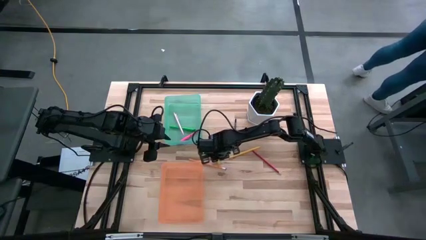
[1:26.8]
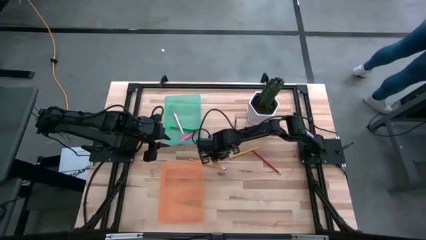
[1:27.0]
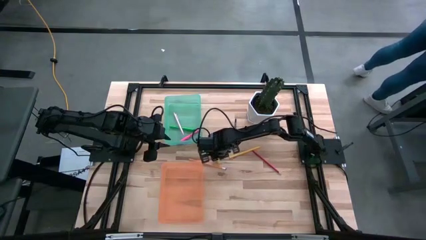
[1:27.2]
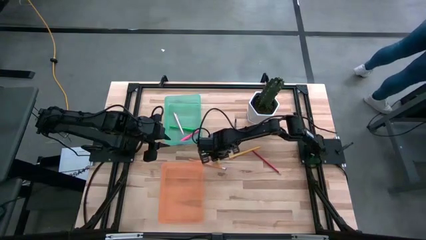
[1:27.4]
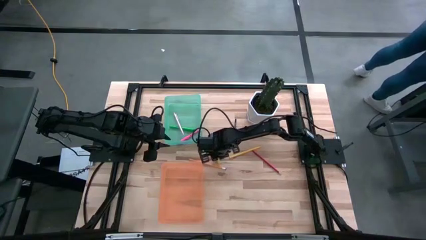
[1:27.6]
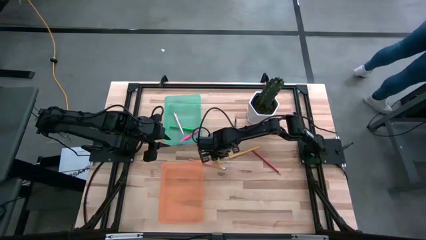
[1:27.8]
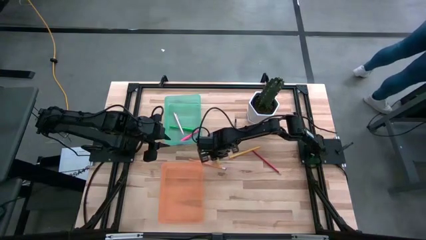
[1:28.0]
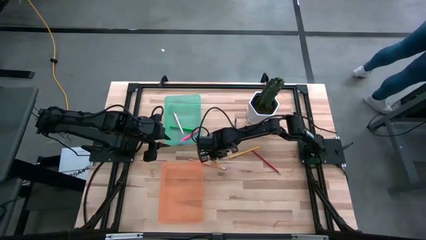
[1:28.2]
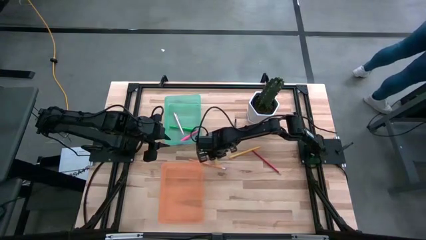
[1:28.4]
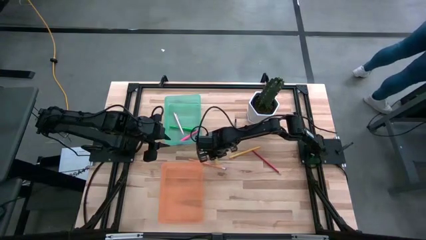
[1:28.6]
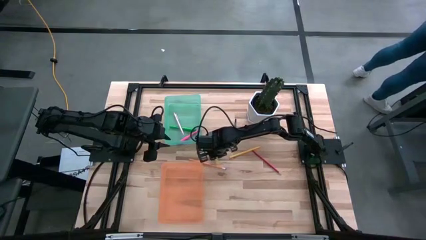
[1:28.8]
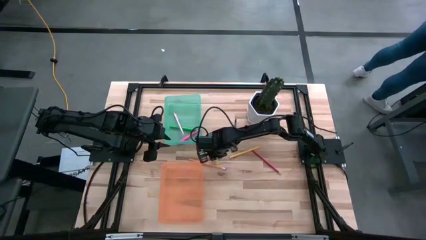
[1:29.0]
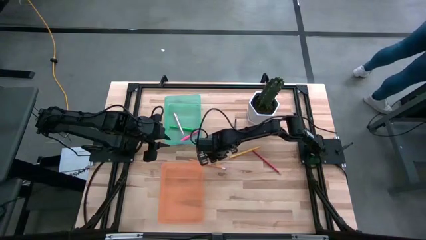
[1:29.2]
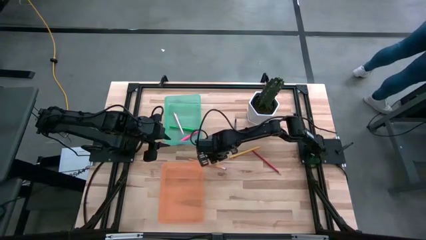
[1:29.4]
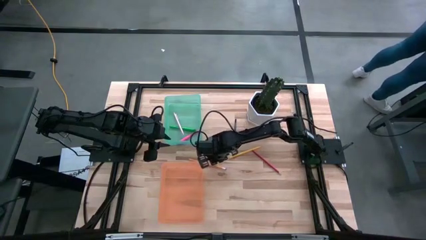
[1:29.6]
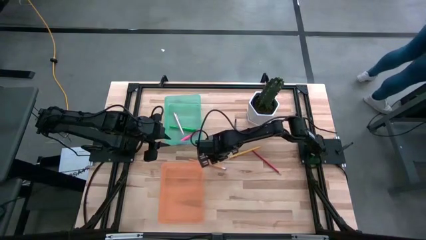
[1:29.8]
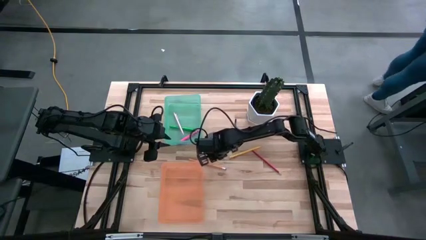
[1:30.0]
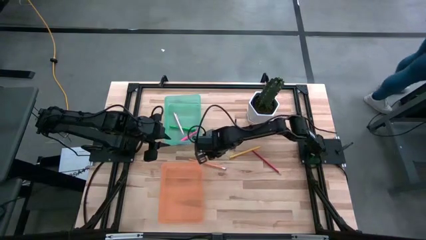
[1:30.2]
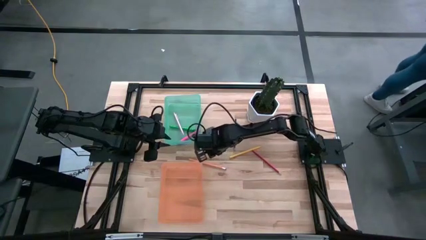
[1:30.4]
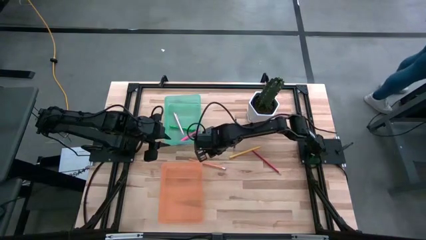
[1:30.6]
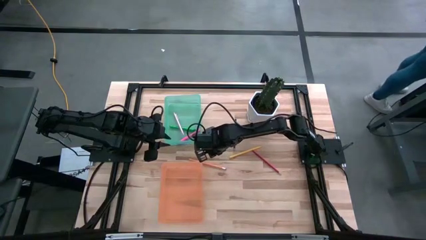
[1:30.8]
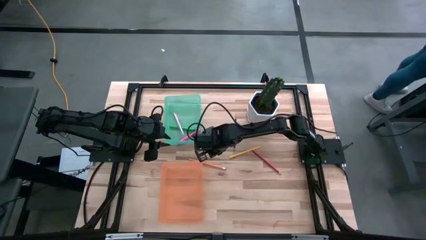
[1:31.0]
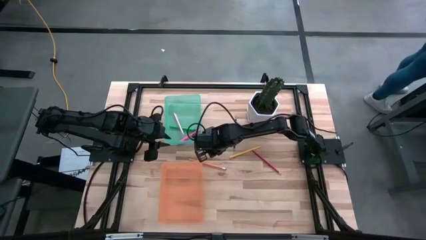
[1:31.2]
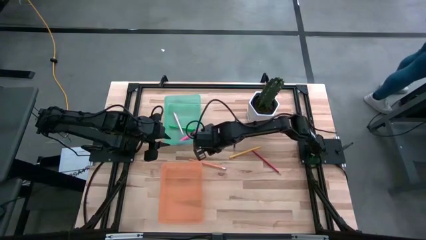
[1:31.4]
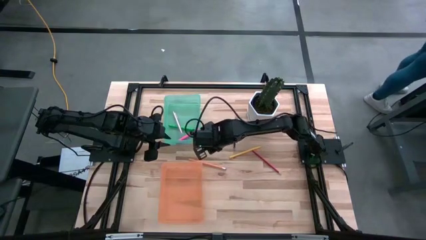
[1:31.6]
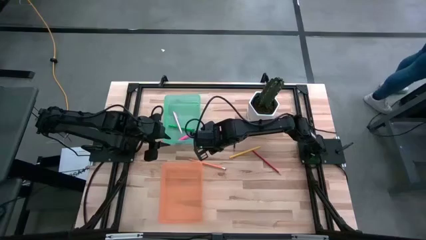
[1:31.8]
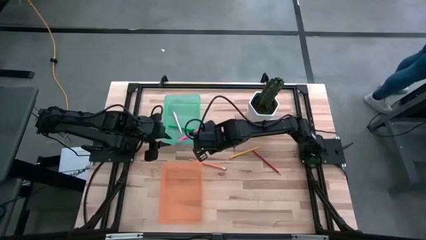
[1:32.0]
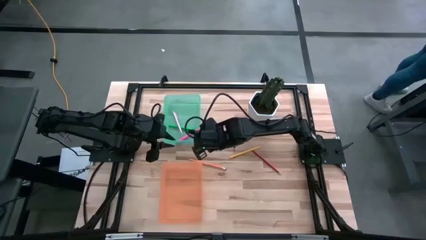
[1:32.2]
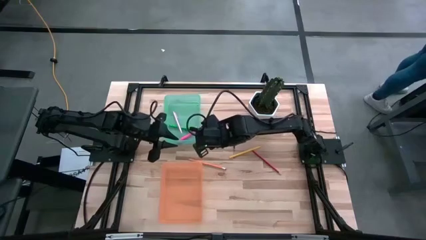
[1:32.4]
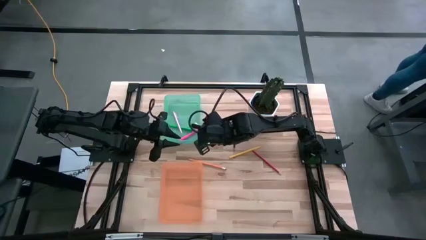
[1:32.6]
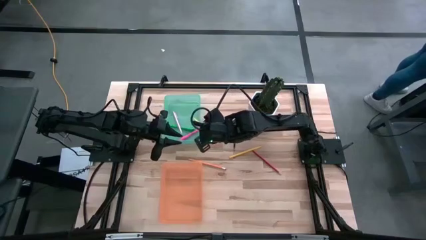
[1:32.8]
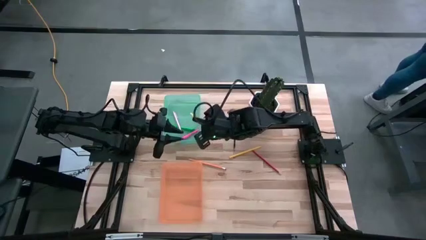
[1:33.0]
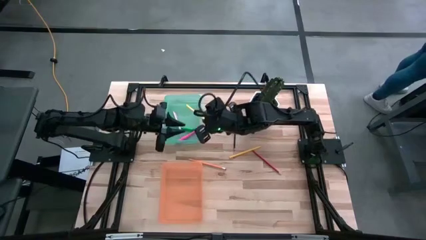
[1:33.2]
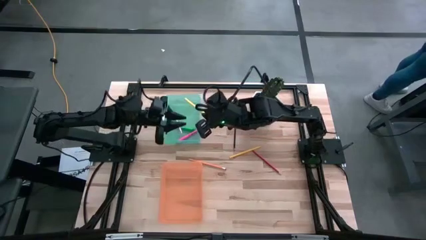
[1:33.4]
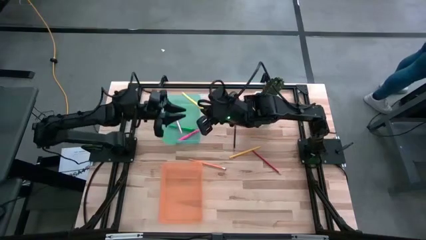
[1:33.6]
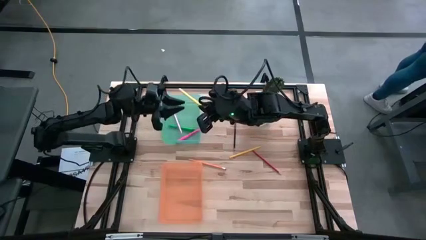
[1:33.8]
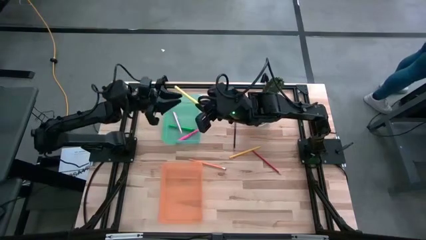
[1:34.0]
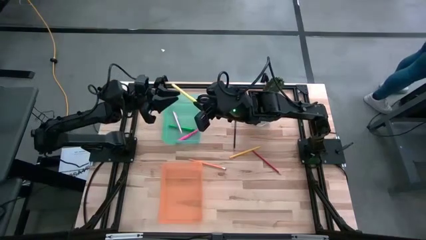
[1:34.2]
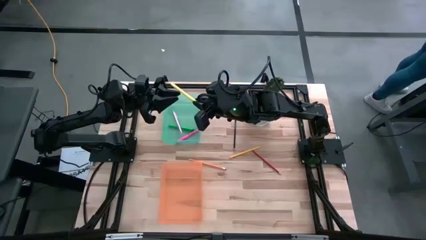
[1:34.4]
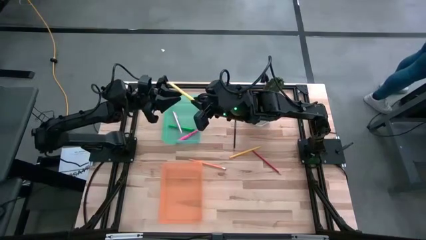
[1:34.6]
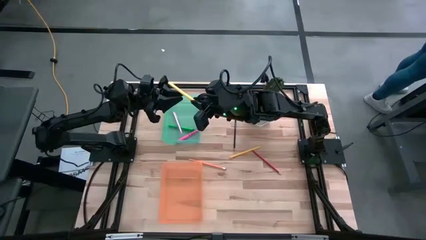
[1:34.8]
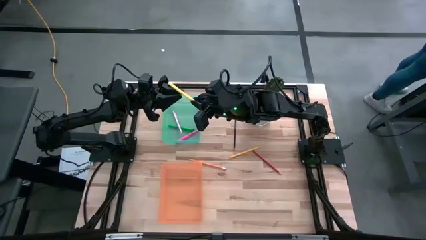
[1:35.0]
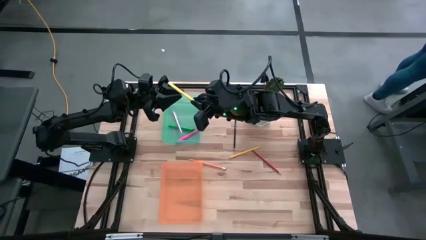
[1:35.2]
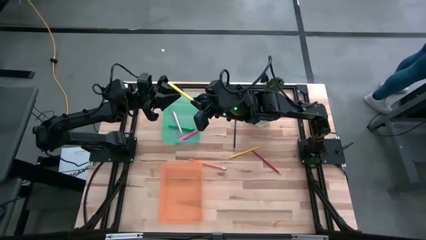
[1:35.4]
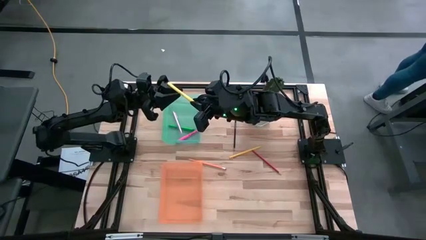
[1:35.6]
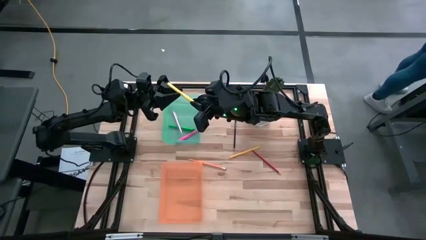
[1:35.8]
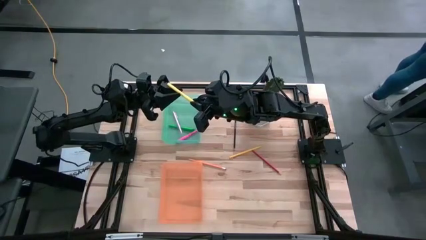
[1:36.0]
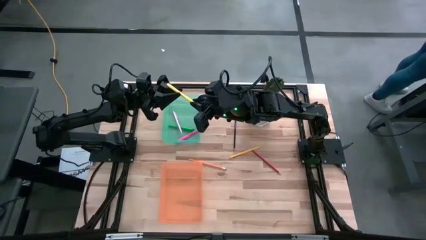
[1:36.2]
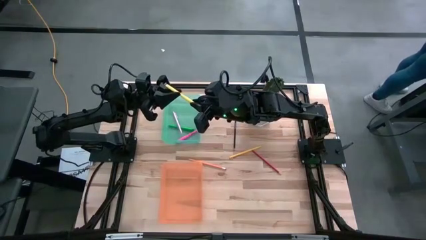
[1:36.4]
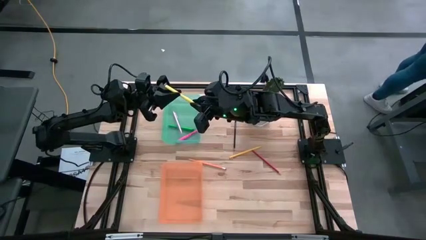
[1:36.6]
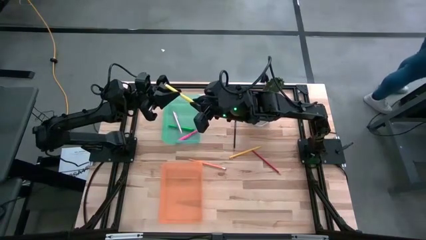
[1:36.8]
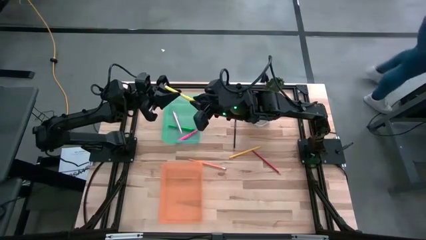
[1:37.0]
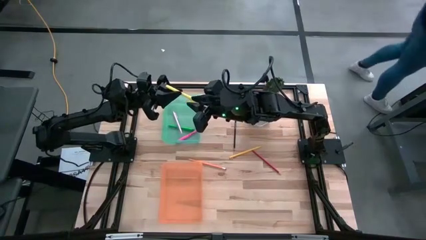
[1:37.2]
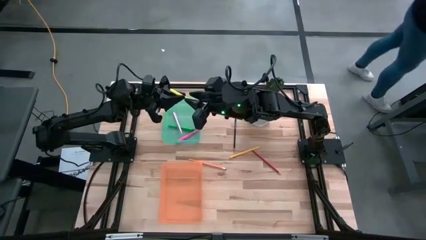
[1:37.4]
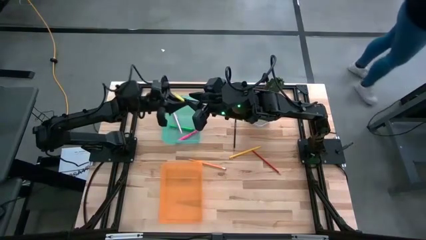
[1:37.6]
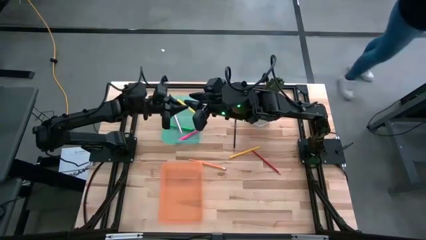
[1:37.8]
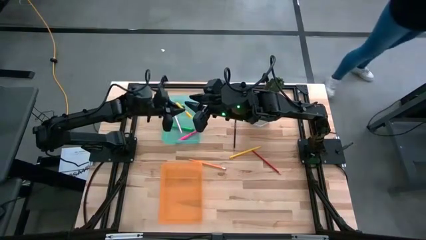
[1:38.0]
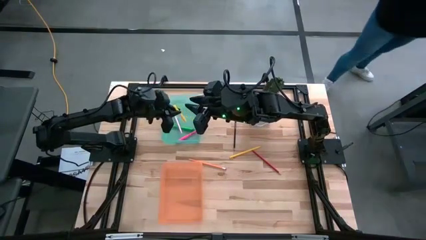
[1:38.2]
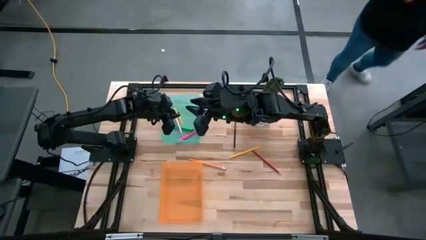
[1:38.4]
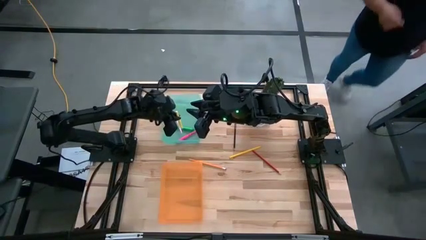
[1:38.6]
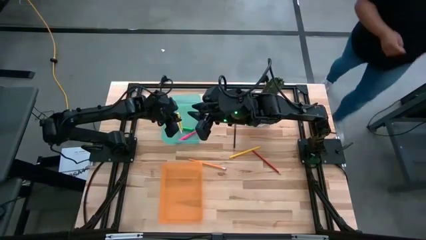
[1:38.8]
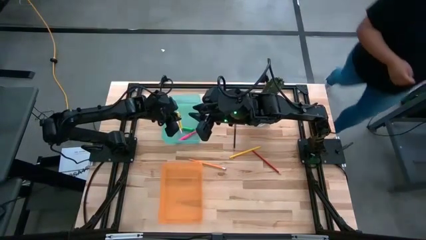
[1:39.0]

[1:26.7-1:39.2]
Task: Sort pens & pencils
Put the yellow pen into the green bin
